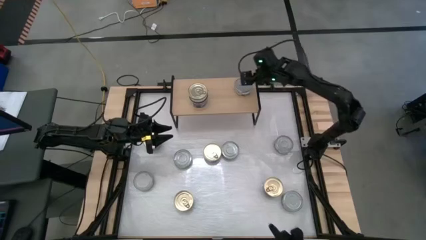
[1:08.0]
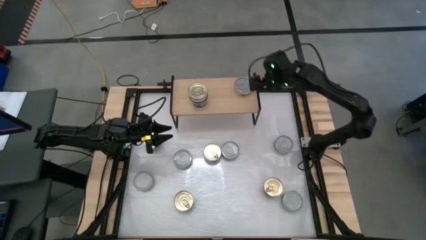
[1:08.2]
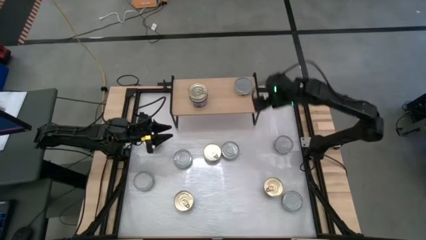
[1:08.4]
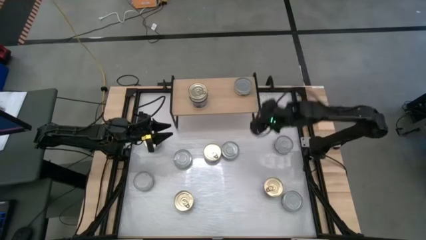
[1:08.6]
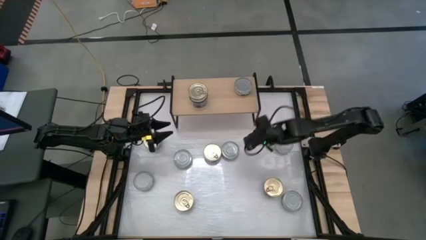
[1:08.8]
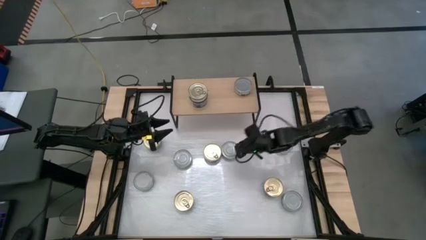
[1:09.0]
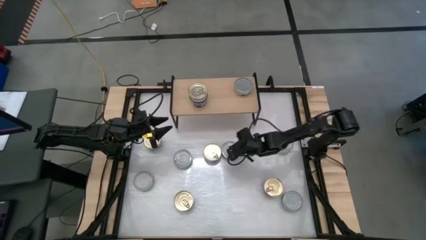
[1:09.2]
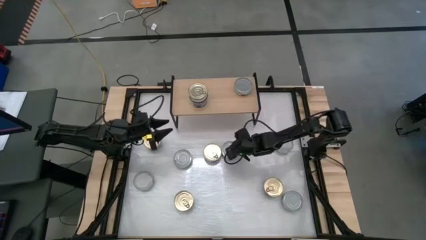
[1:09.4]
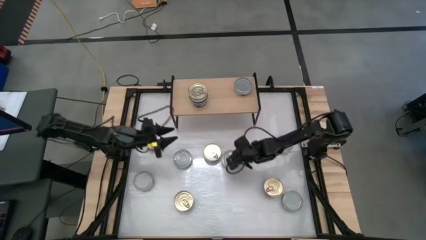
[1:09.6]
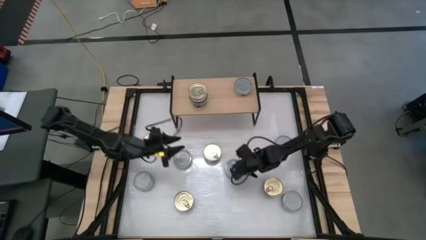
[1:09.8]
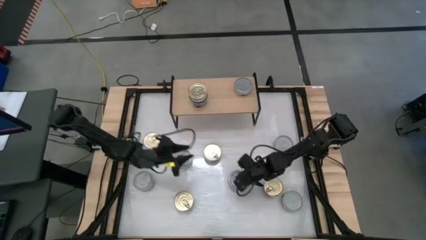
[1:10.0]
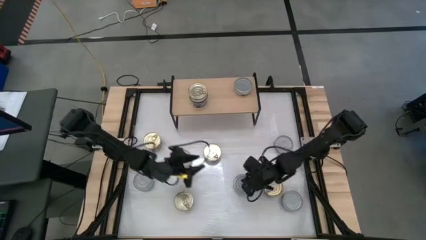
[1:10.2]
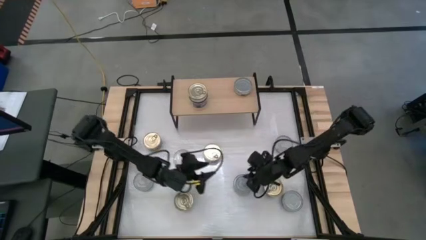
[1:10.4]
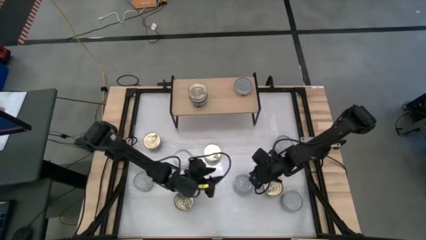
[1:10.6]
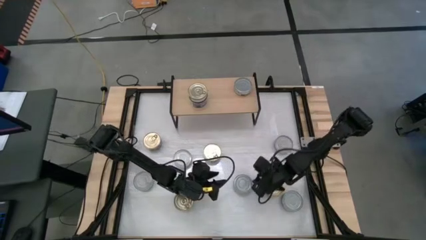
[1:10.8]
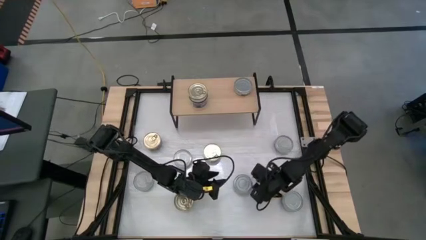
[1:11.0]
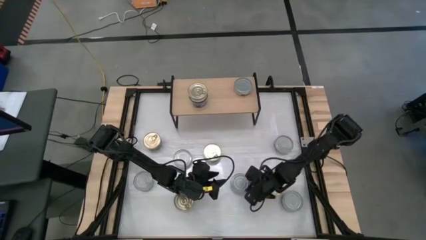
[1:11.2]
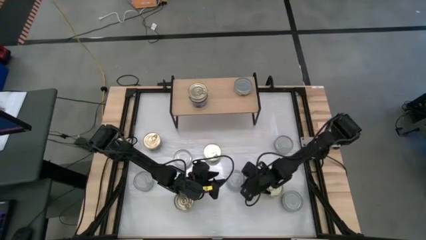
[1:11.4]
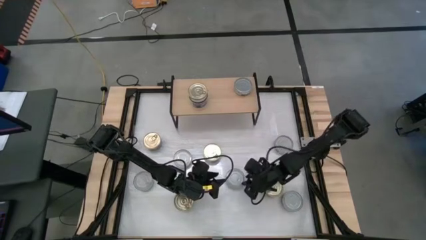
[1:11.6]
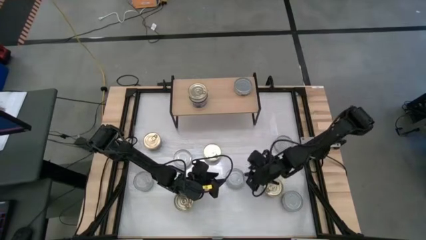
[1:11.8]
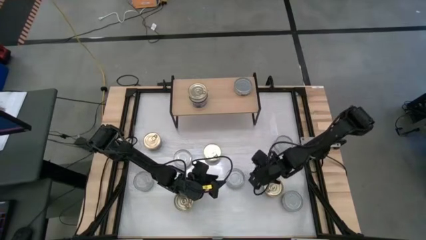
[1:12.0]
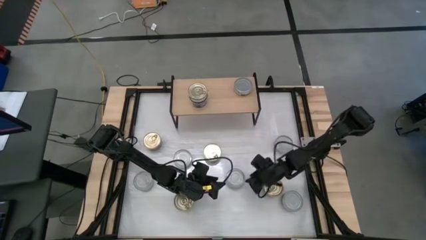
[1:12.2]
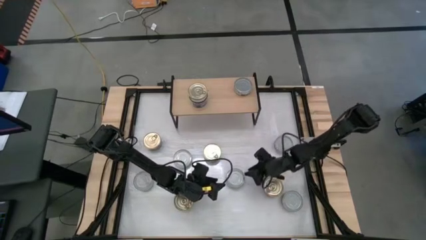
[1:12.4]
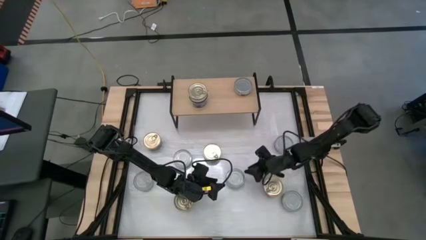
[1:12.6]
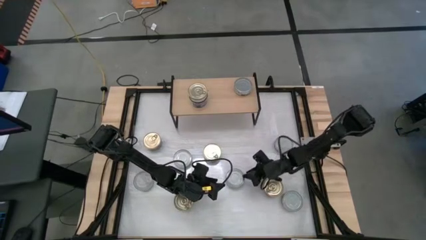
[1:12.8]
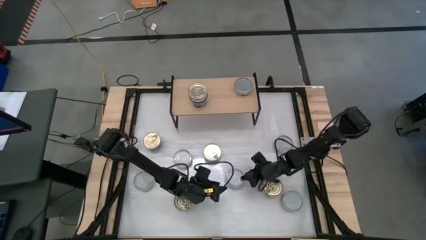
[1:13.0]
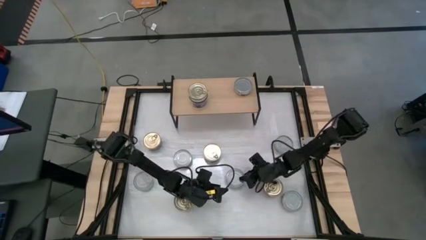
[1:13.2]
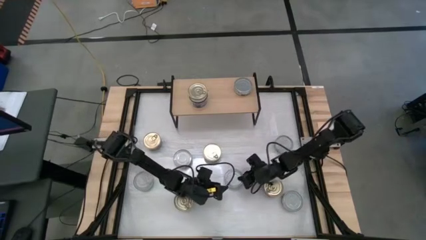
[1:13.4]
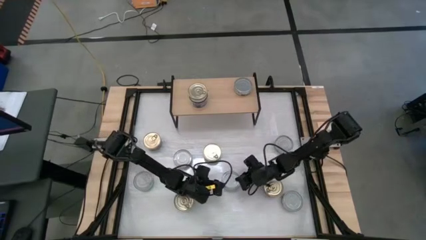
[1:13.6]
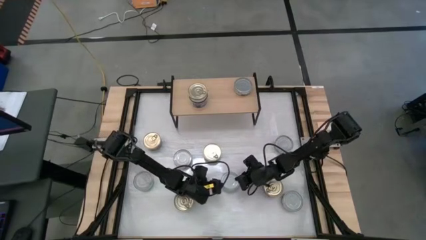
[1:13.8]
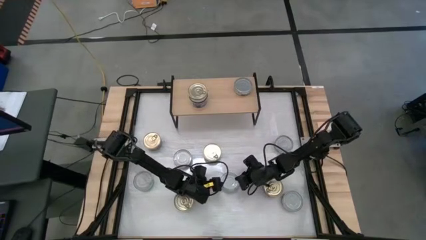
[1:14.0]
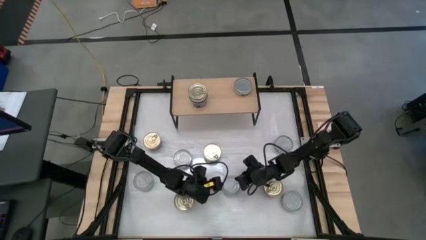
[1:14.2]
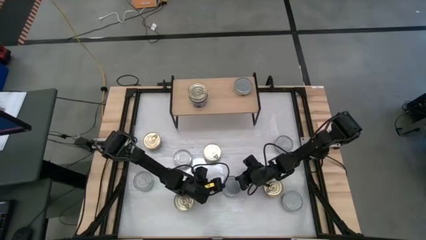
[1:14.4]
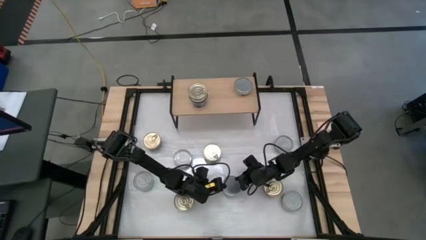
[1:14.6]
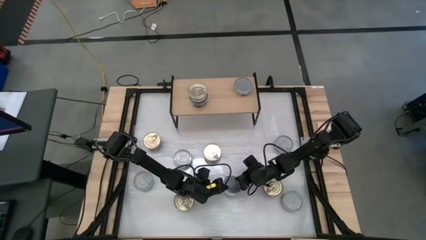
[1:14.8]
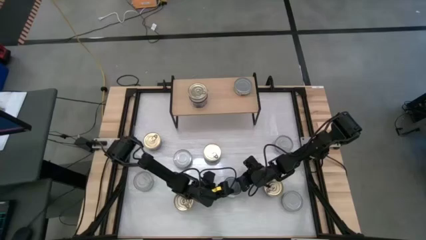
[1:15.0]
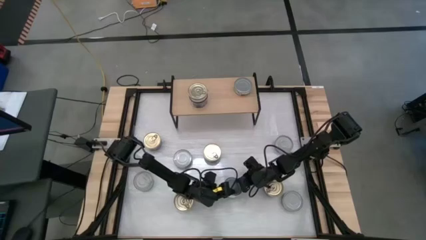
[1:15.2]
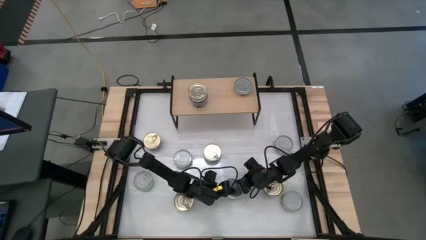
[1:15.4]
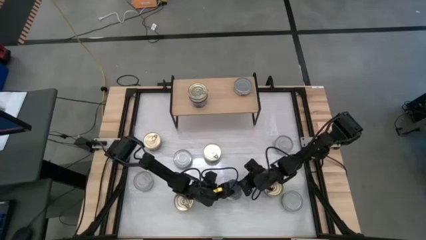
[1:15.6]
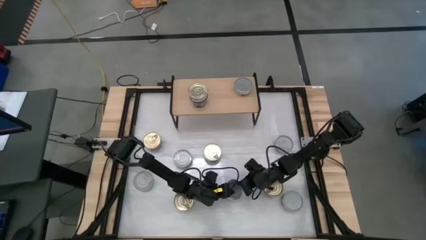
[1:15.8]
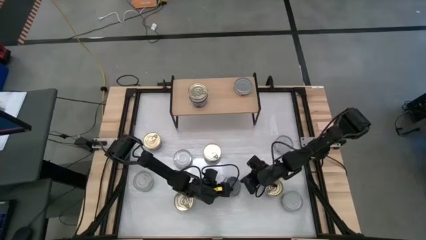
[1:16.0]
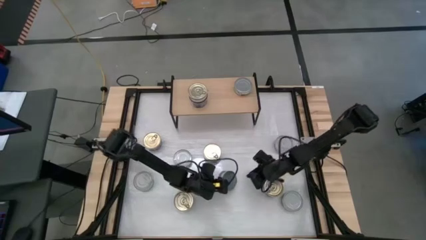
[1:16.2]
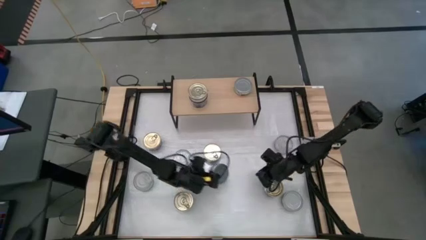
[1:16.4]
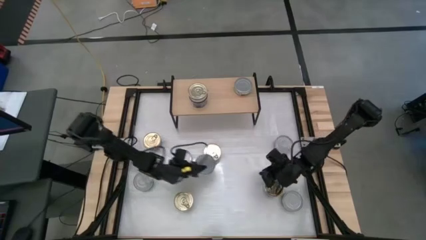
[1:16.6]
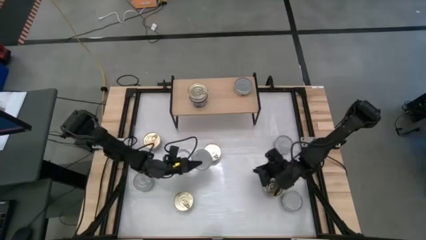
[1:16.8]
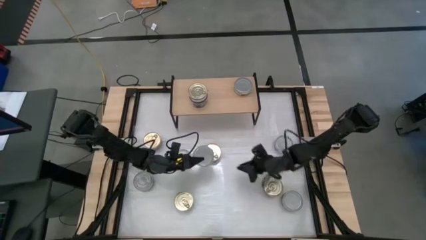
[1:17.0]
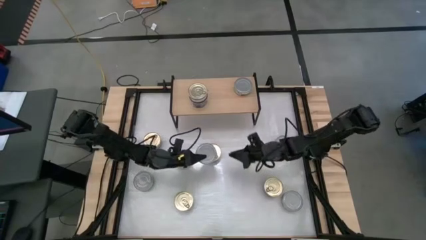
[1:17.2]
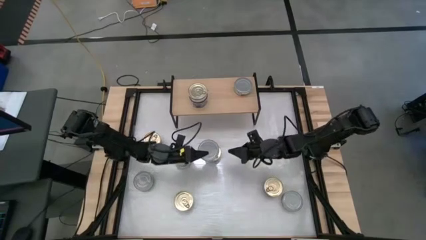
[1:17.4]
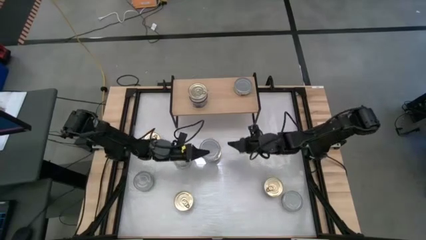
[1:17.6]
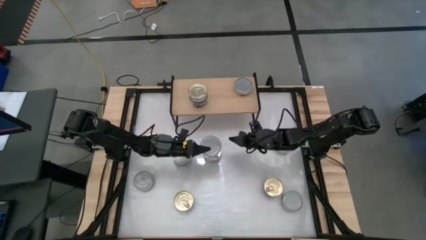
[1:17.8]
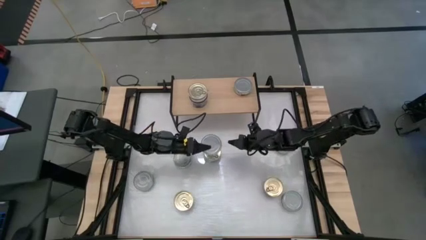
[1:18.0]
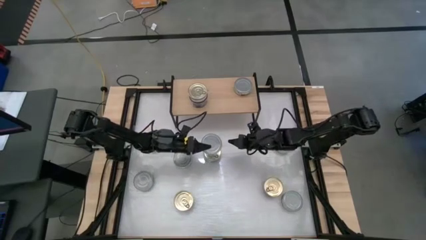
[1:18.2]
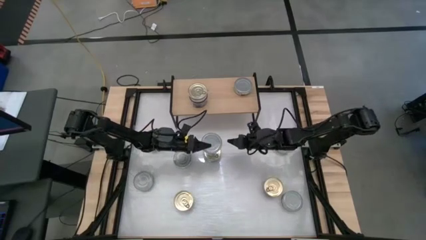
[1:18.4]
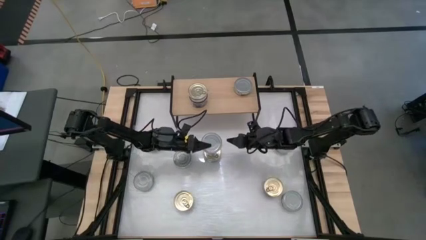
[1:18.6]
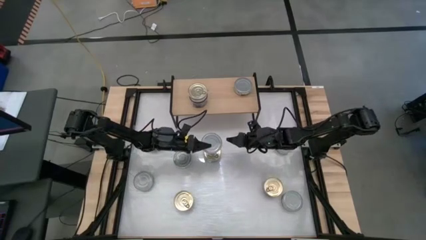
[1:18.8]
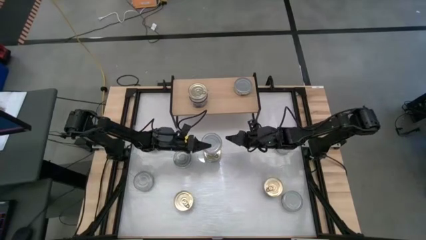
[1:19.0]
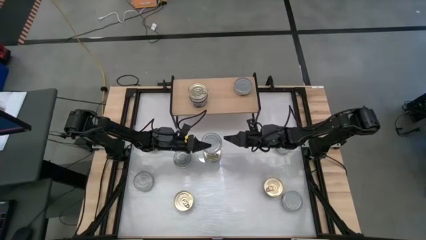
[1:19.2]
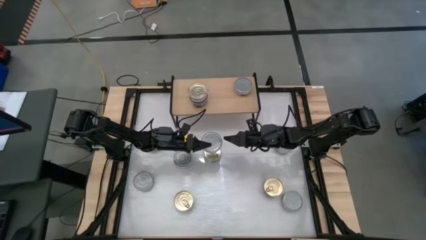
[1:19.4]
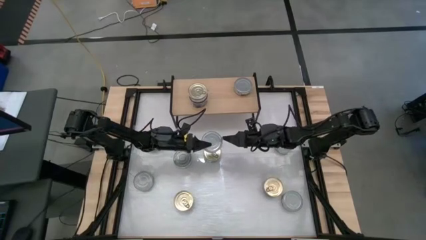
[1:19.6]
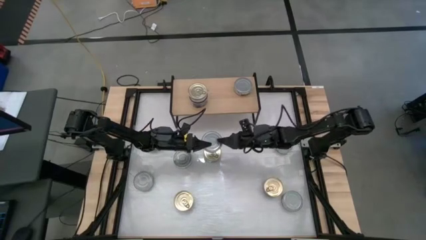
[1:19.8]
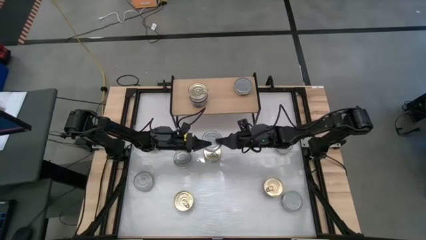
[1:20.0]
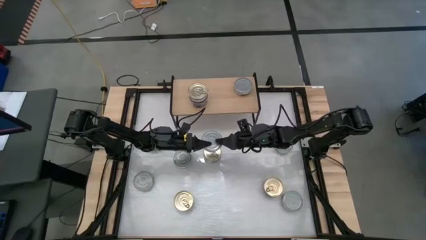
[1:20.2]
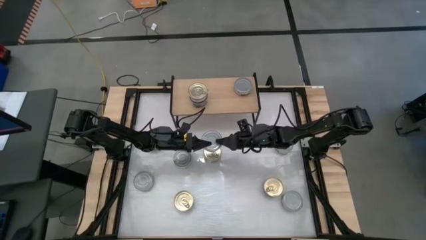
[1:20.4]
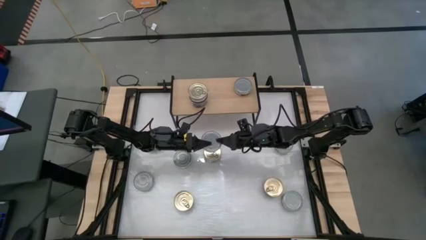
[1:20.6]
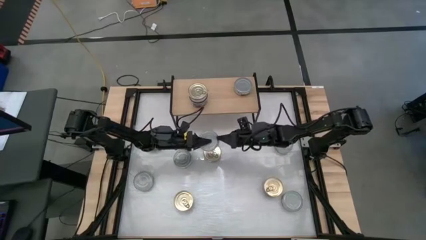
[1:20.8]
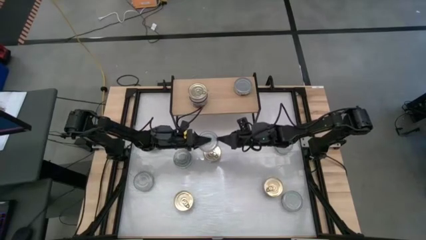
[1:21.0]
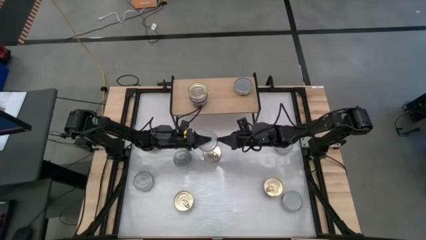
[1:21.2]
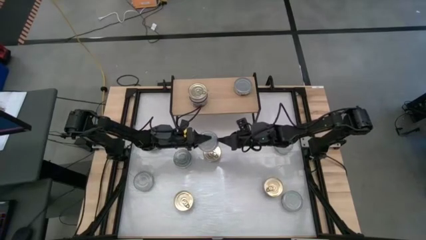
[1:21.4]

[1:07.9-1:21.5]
Task: Stack canned seafood by type on shelf
Stack the green white tuna can on top of the other green white tuna can on the shelf
